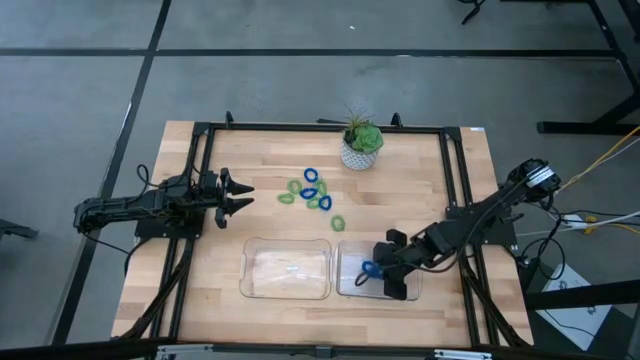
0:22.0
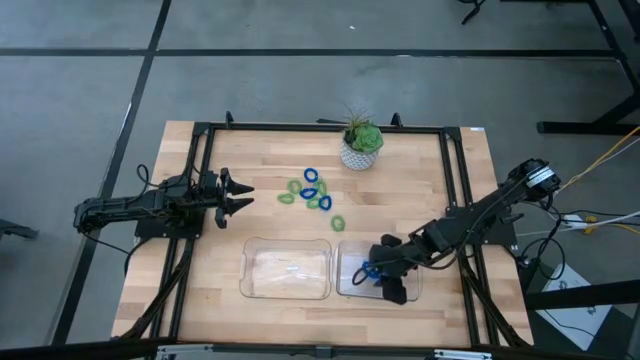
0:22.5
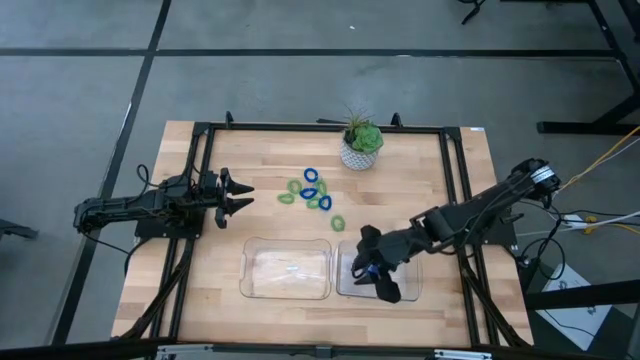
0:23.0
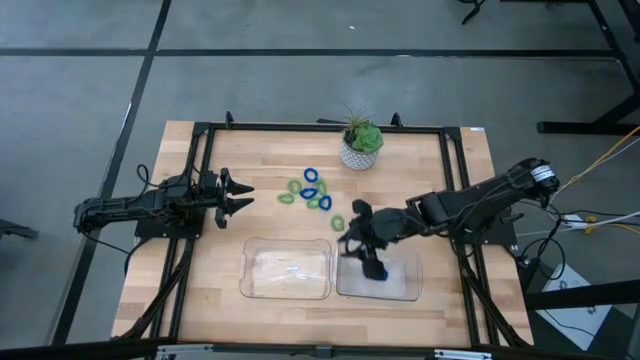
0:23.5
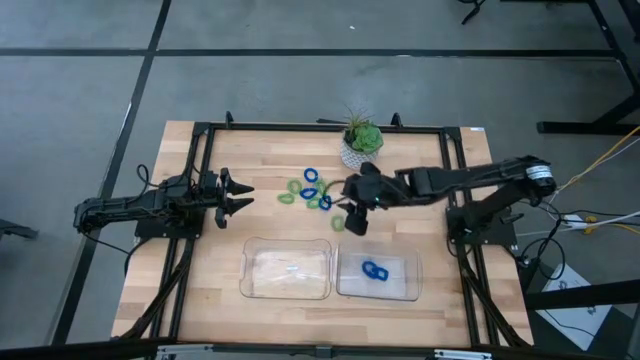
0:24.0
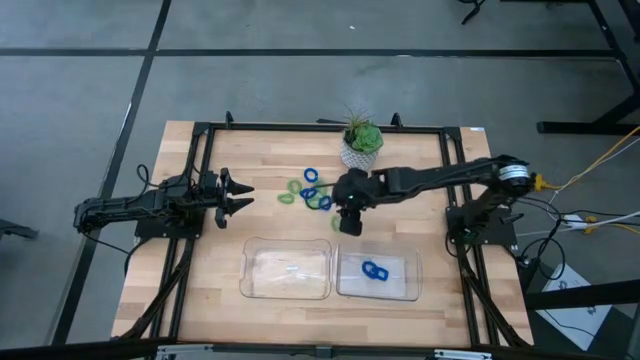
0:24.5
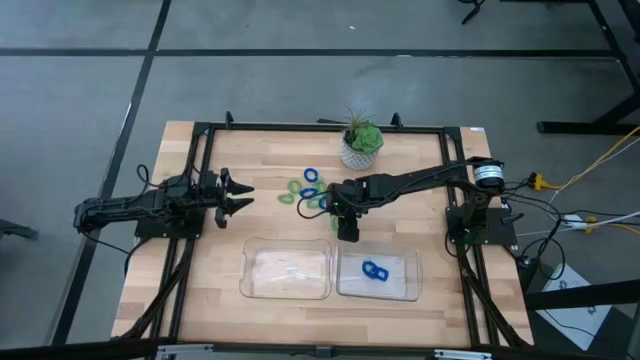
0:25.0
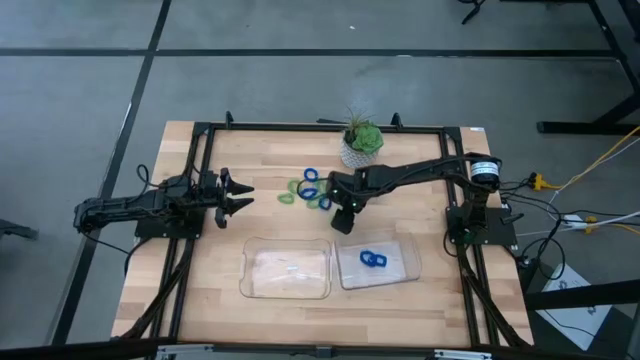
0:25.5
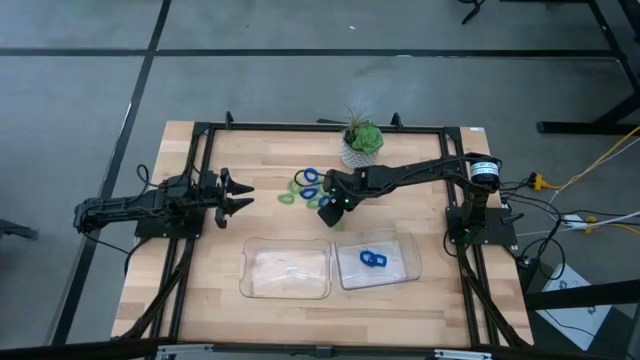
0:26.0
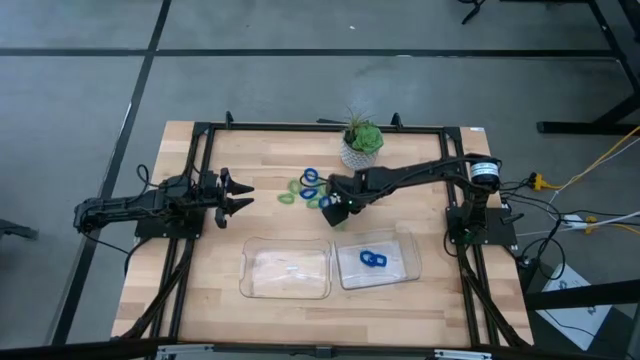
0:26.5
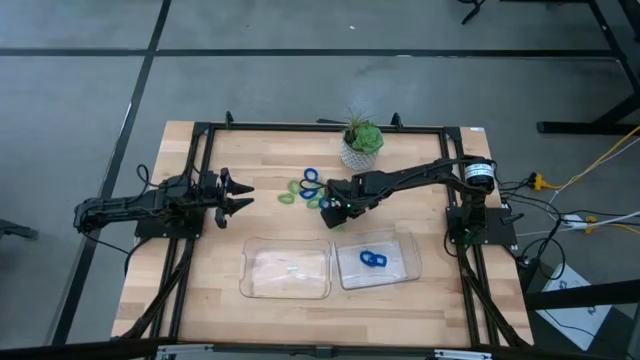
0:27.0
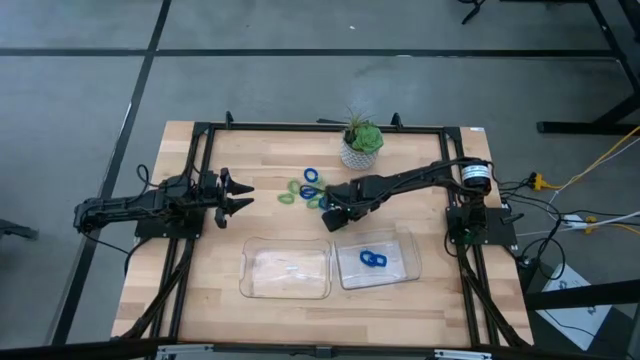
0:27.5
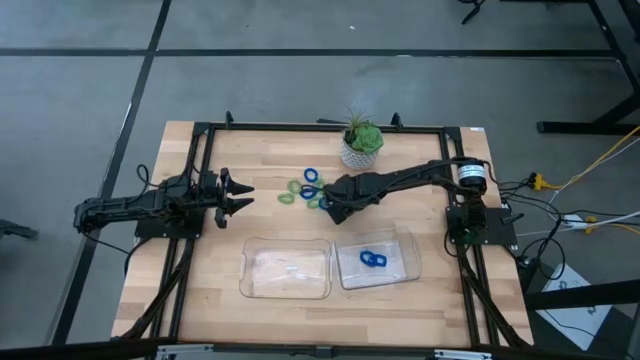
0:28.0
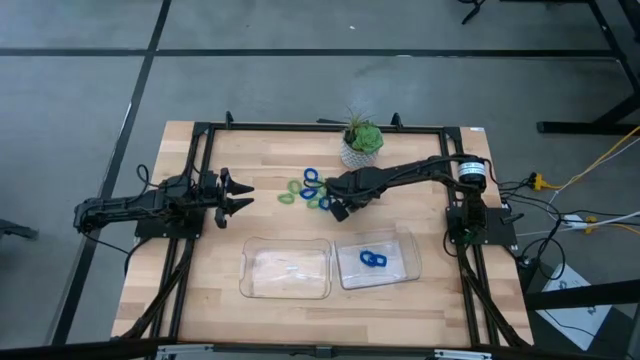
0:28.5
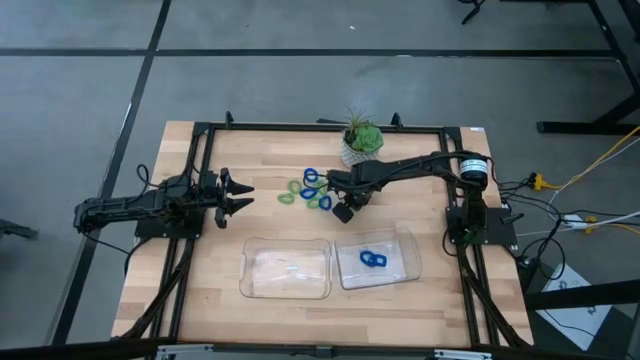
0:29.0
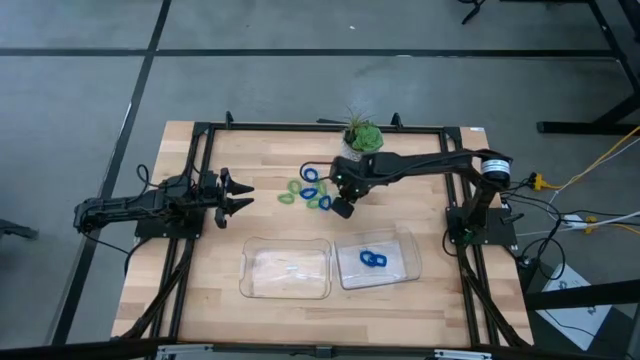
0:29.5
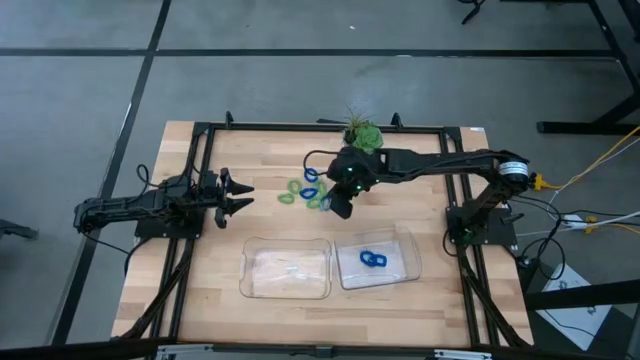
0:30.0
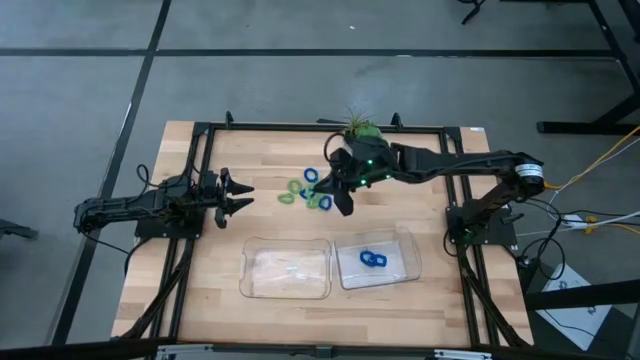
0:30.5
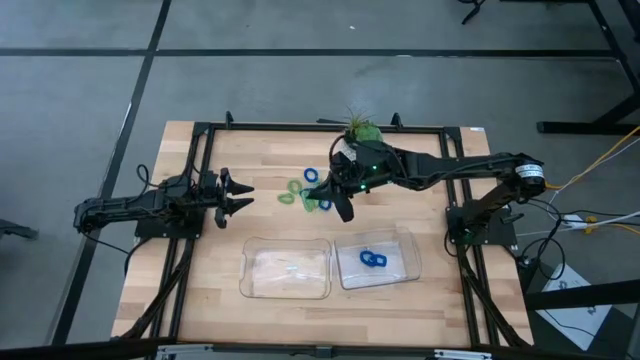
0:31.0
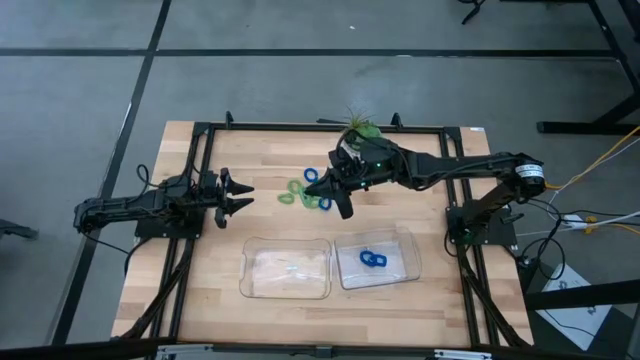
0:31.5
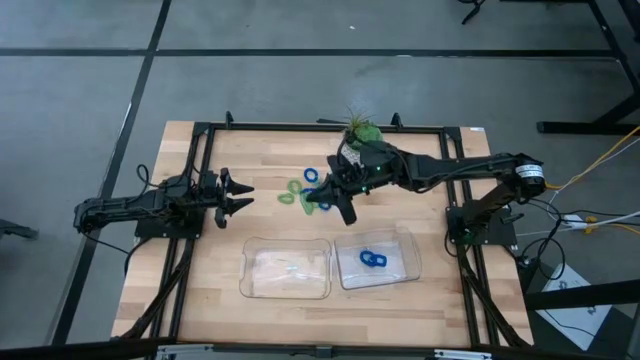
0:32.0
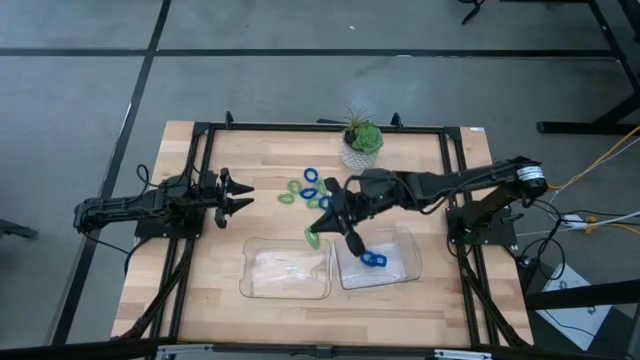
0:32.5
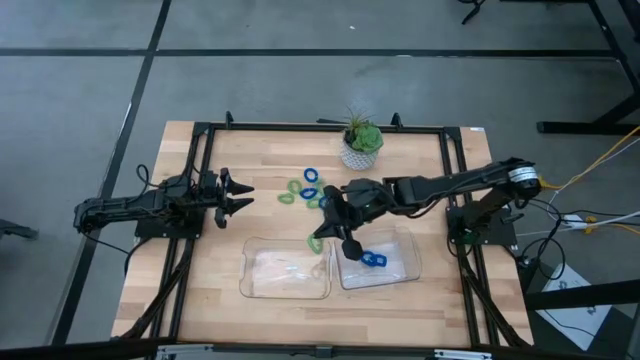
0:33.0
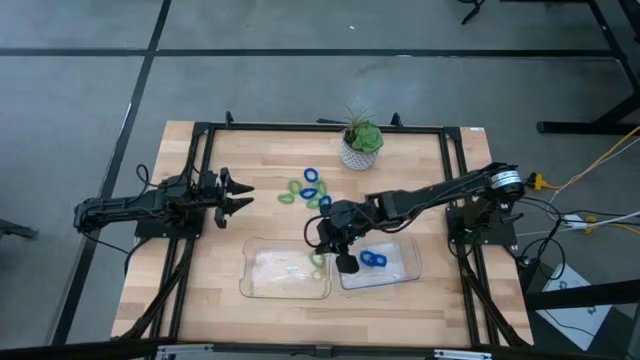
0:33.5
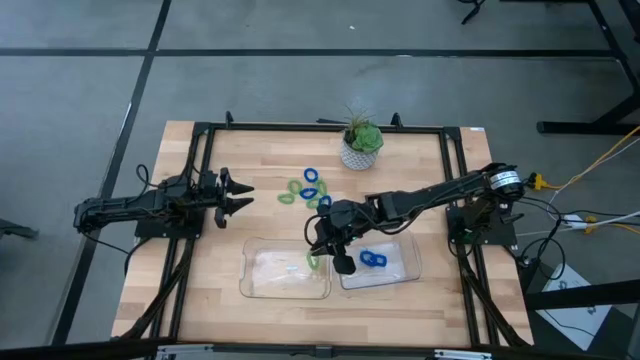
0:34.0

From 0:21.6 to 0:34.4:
Task: Sort spring keychains
Put the green spring keychain into the left transparent bin

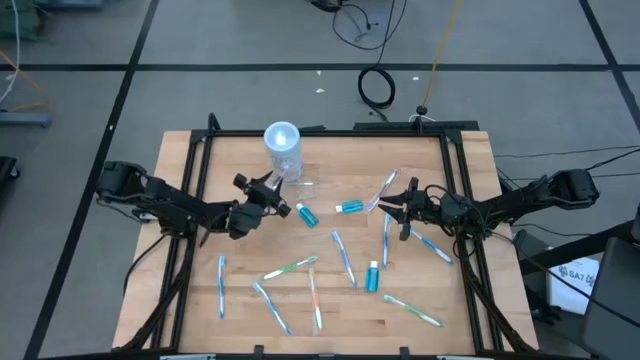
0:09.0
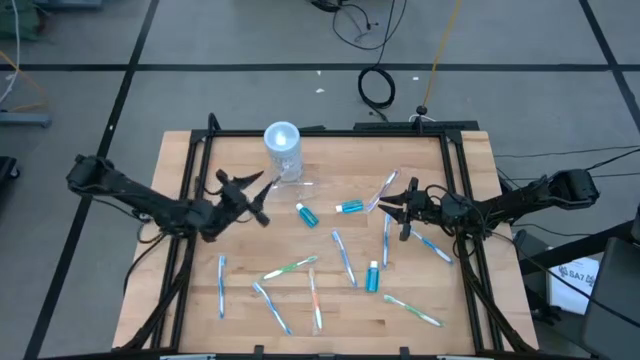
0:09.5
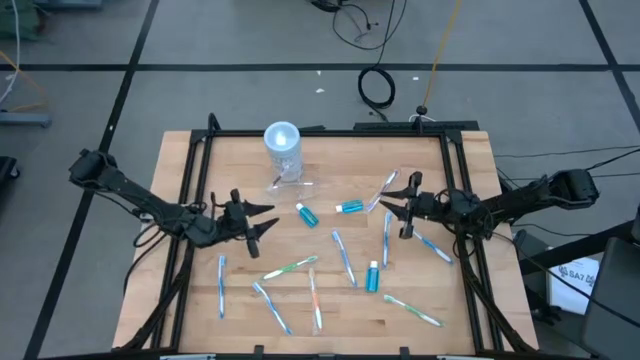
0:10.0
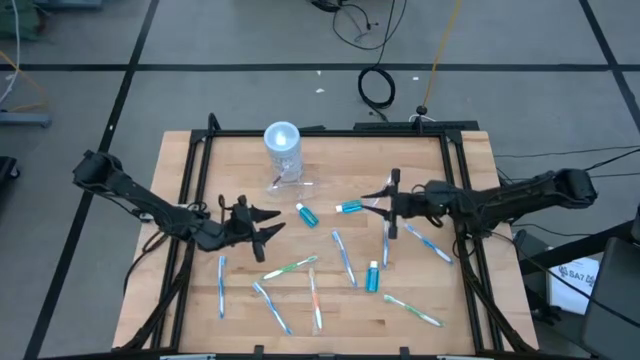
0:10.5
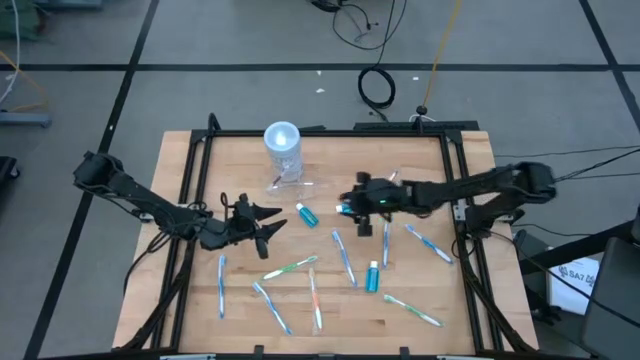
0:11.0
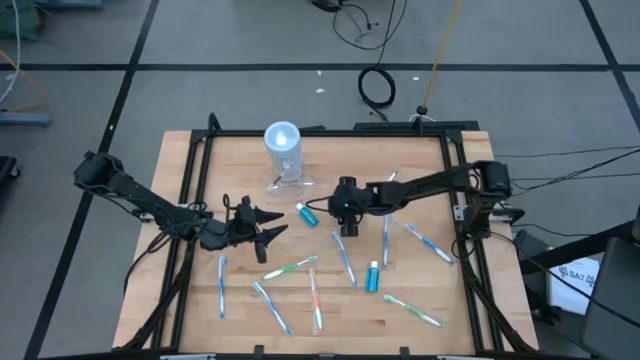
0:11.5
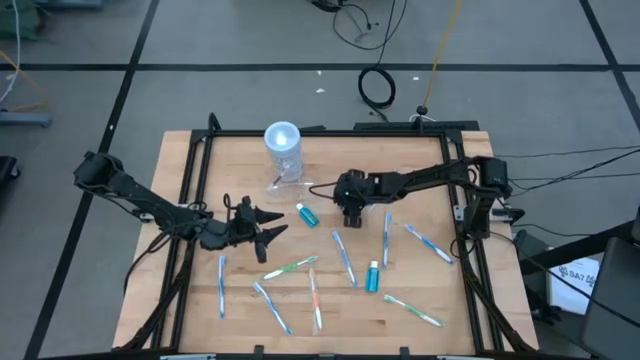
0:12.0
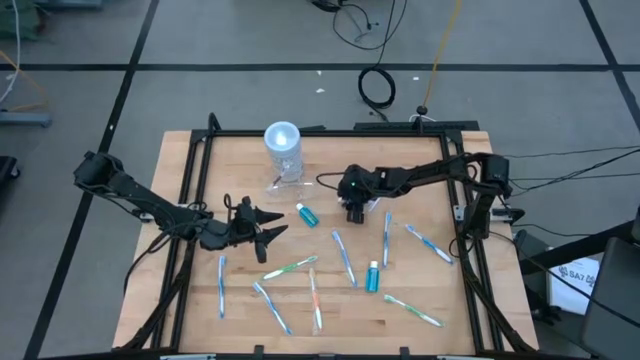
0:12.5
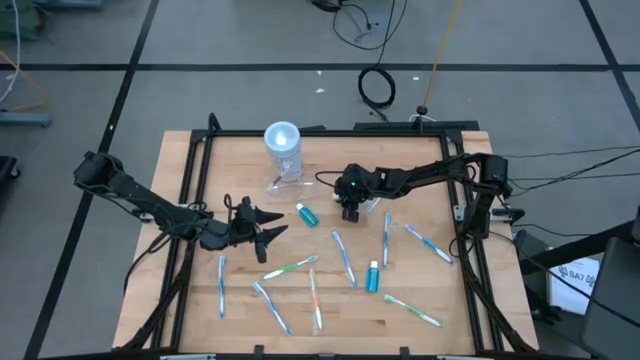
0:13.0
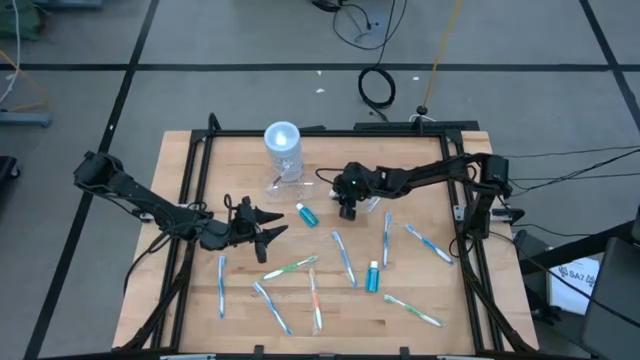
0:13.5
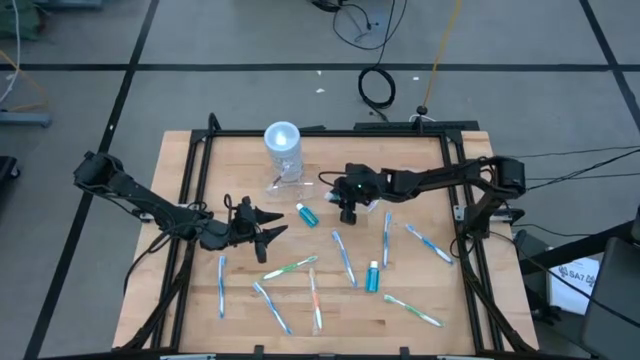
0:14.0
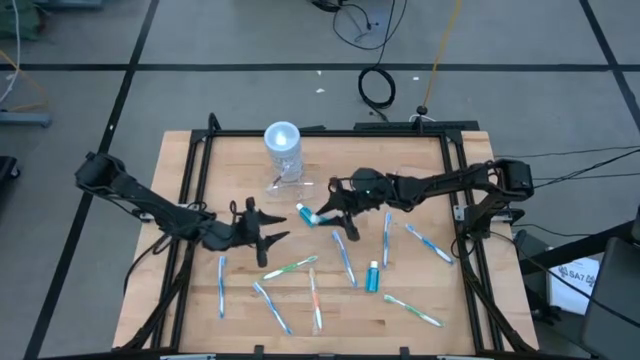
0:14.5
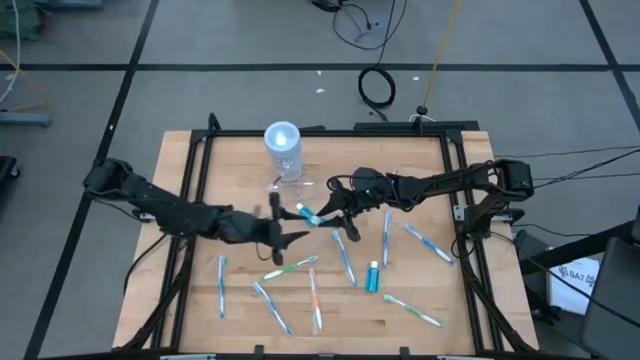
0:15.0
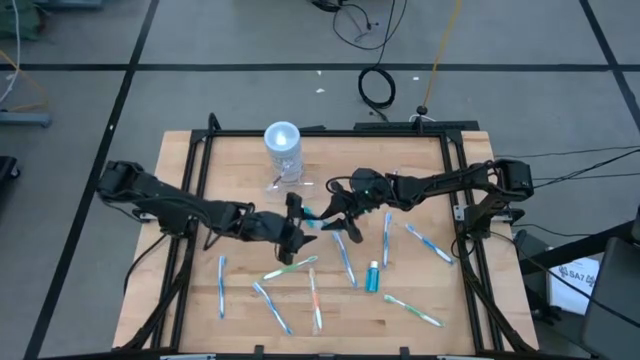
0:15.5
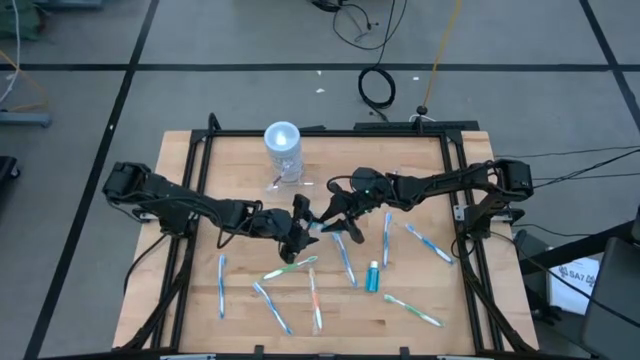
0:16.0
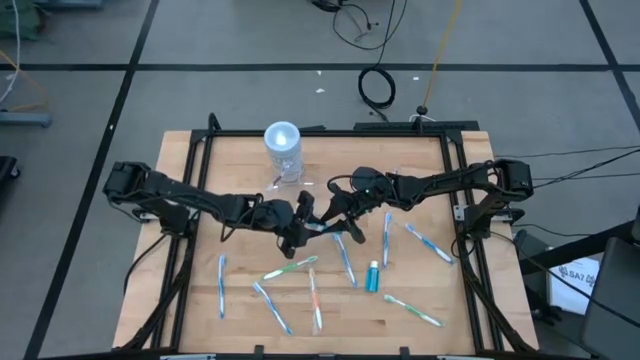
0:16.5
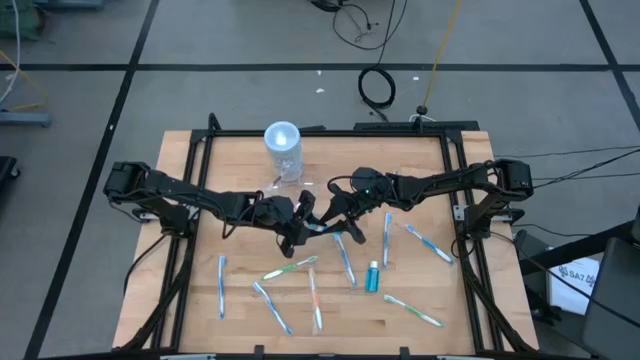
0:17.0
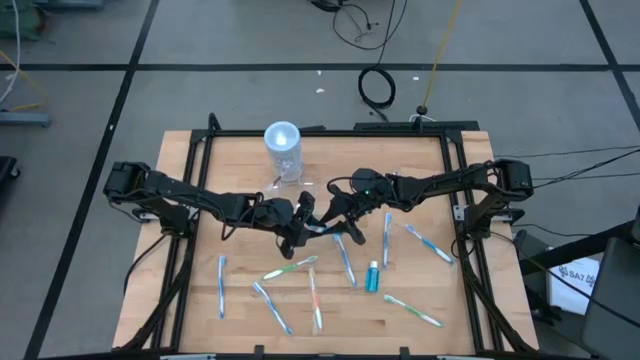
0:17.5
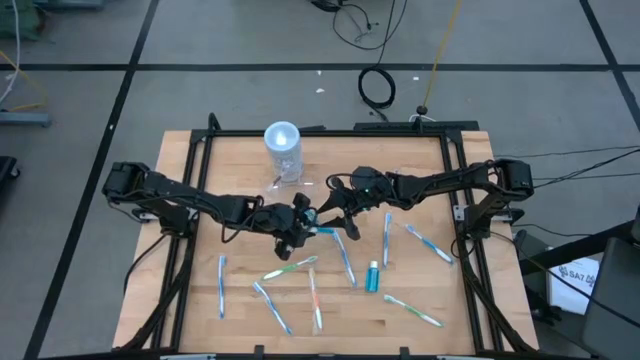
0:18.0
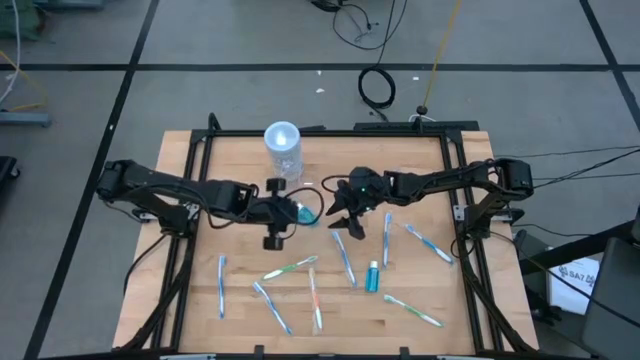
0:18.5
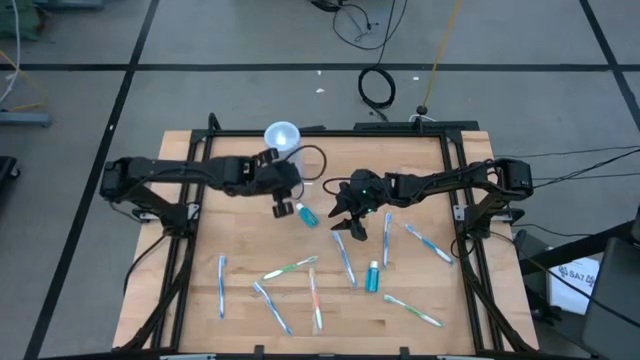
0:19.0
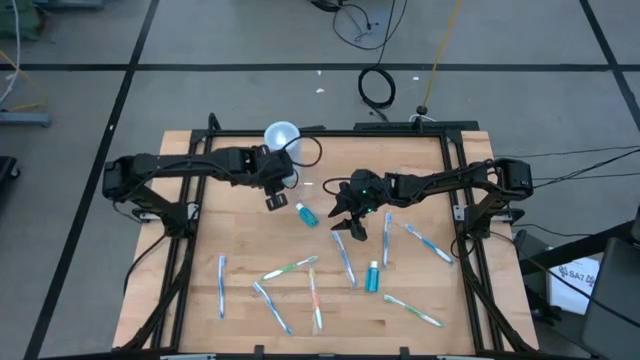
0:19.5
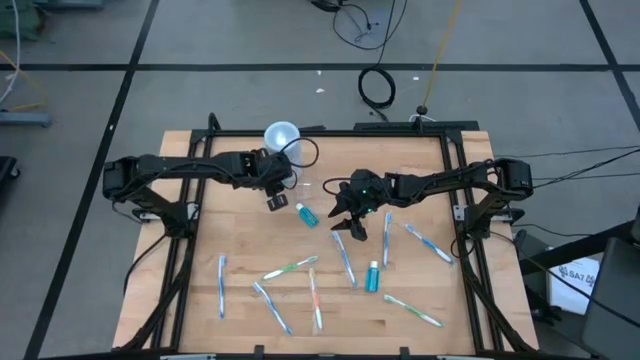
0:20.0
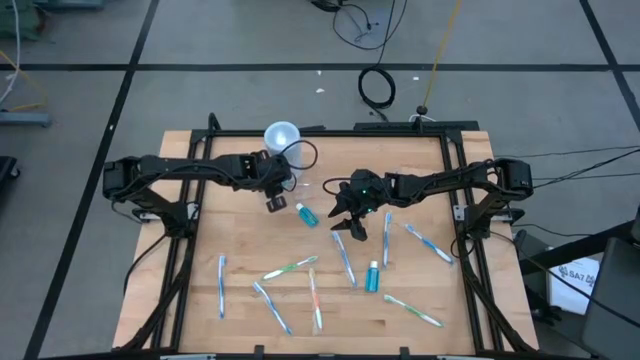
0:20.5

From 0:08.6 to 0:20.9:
Task: Pick & Place toothbrushing station
Put the top right blue mouthwash into the transparent organizer
